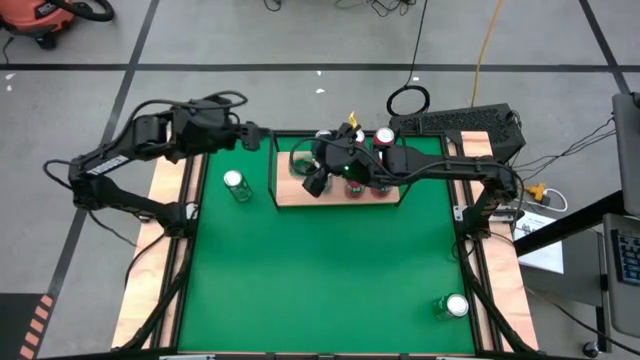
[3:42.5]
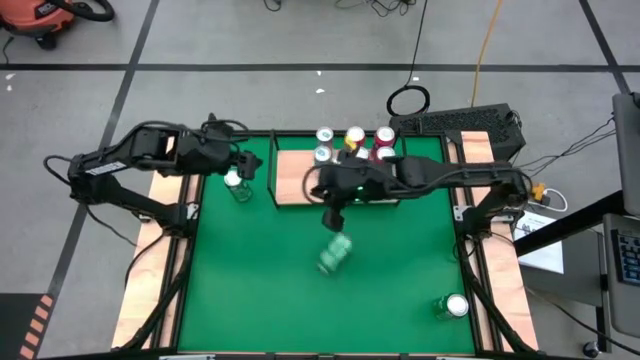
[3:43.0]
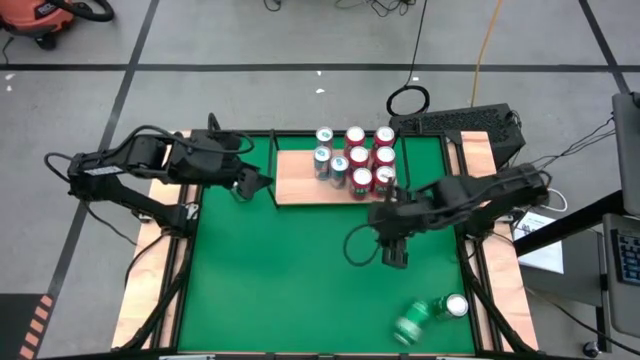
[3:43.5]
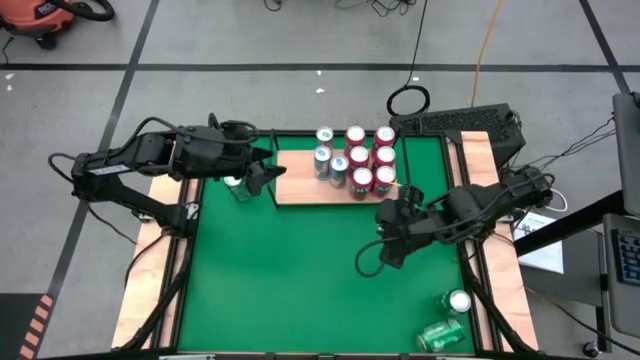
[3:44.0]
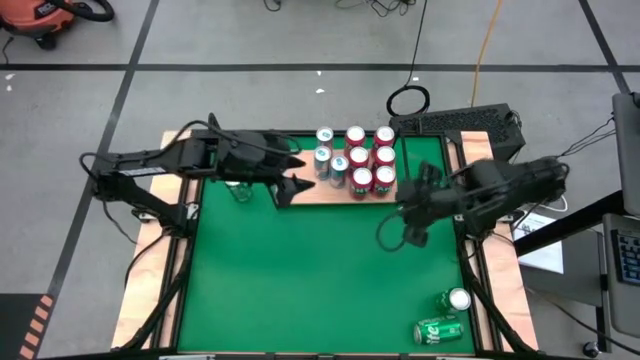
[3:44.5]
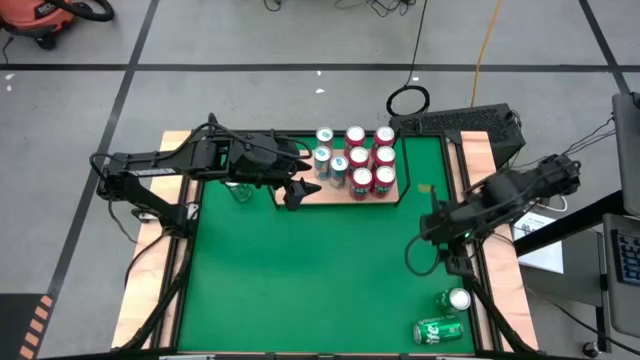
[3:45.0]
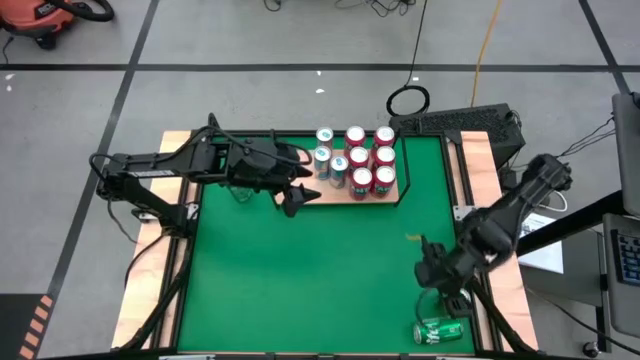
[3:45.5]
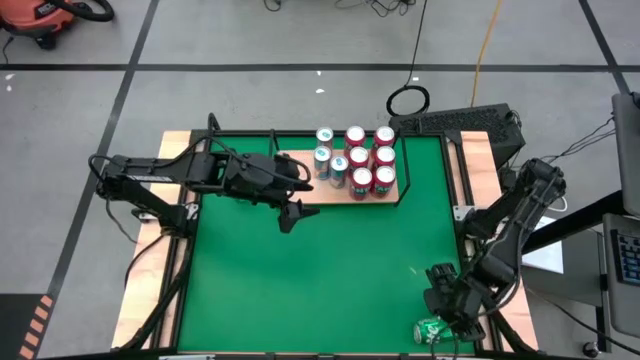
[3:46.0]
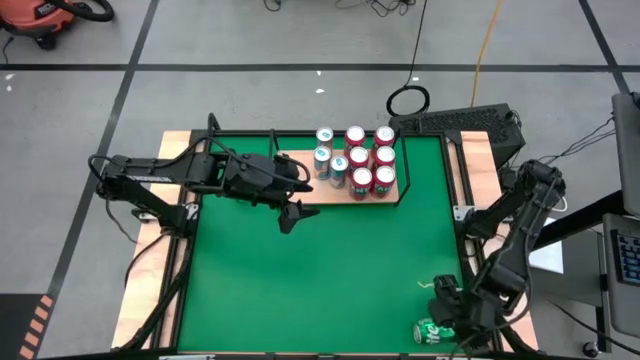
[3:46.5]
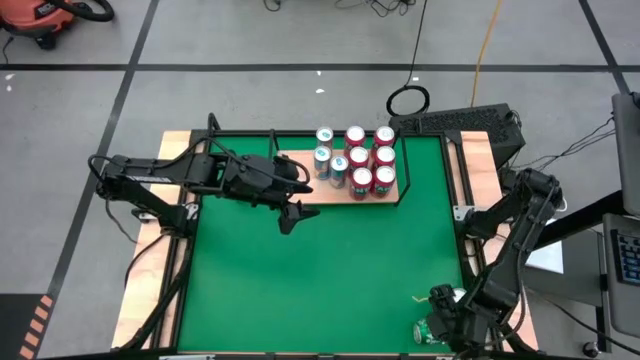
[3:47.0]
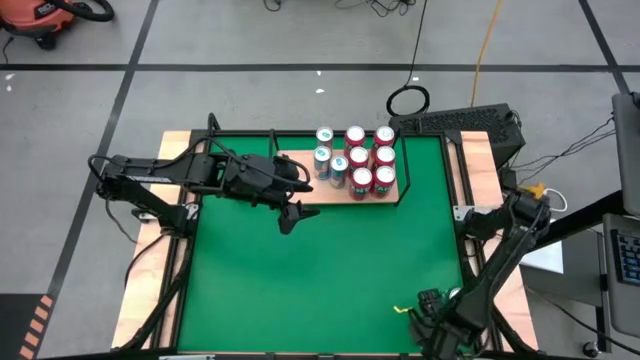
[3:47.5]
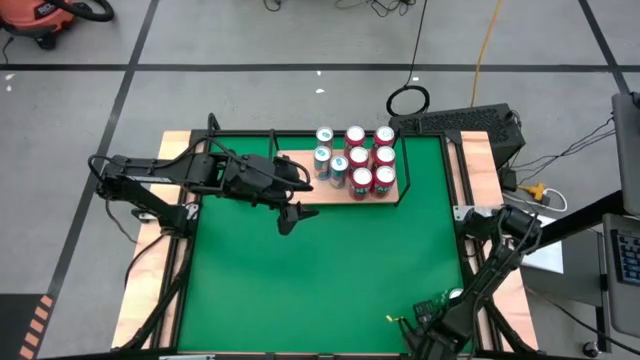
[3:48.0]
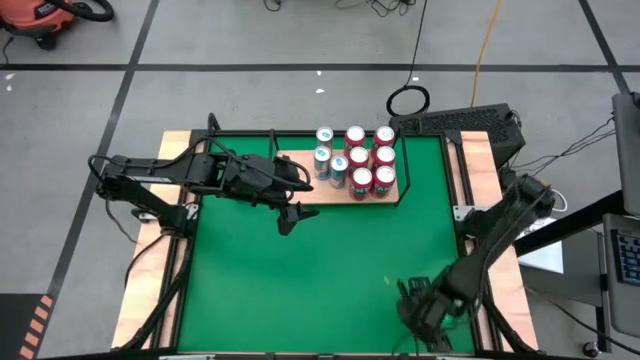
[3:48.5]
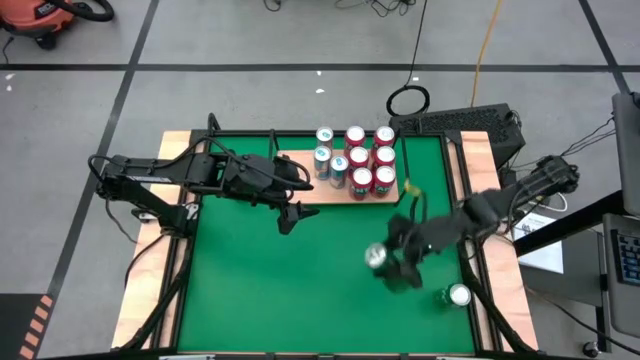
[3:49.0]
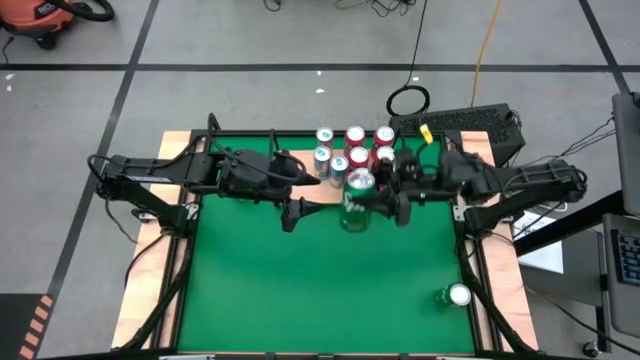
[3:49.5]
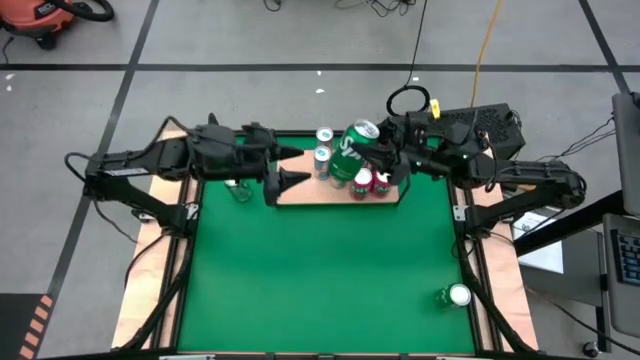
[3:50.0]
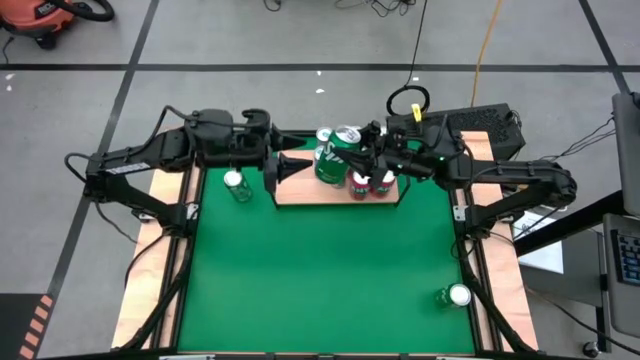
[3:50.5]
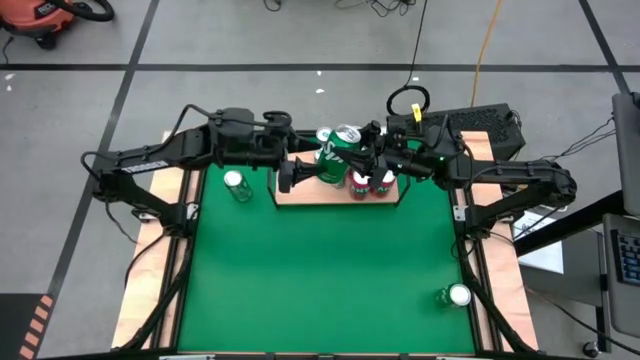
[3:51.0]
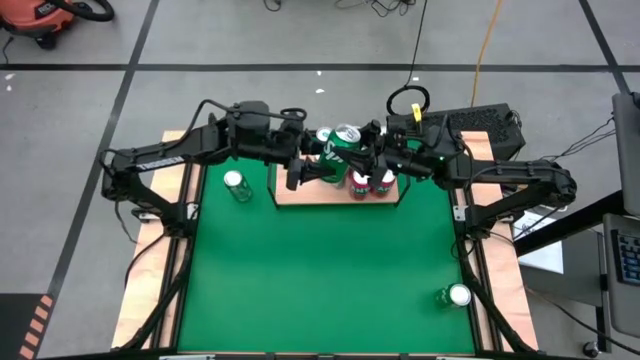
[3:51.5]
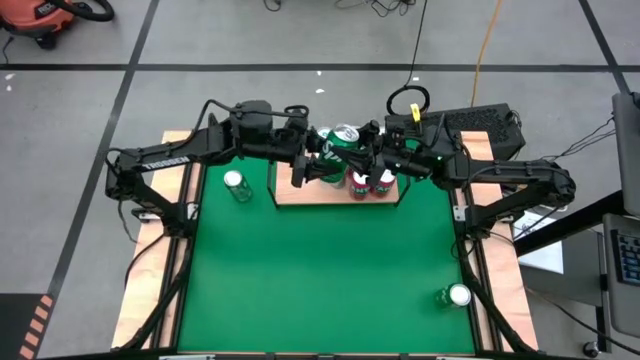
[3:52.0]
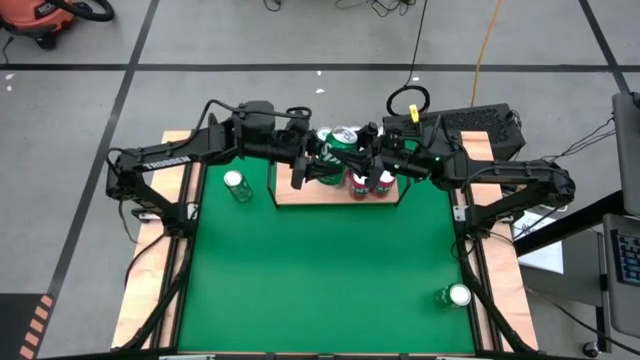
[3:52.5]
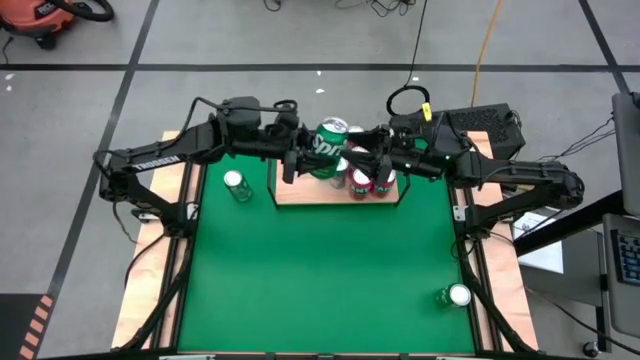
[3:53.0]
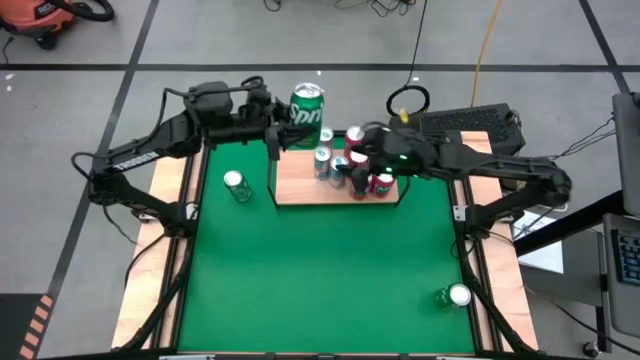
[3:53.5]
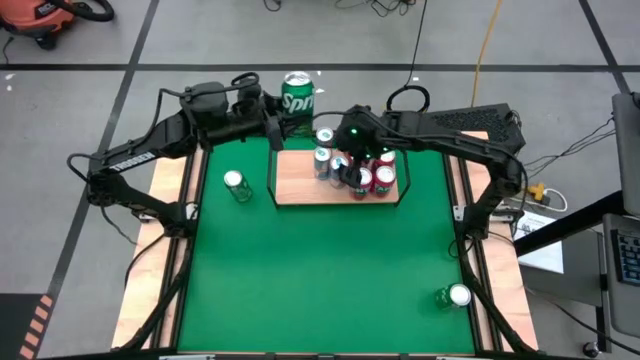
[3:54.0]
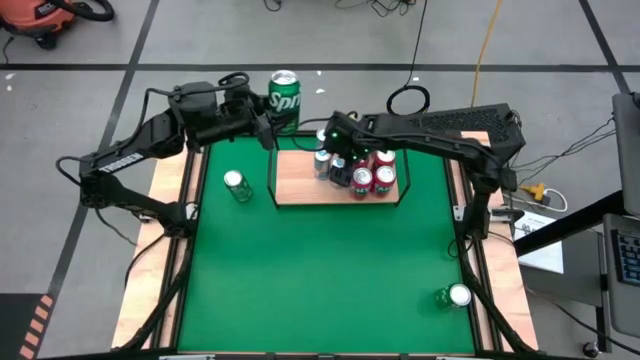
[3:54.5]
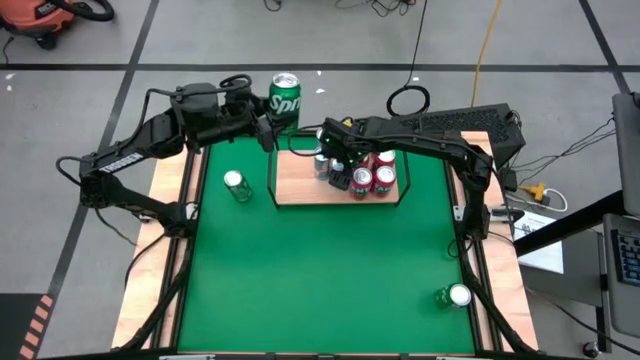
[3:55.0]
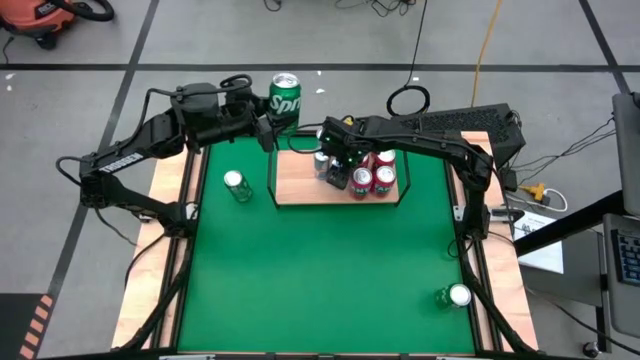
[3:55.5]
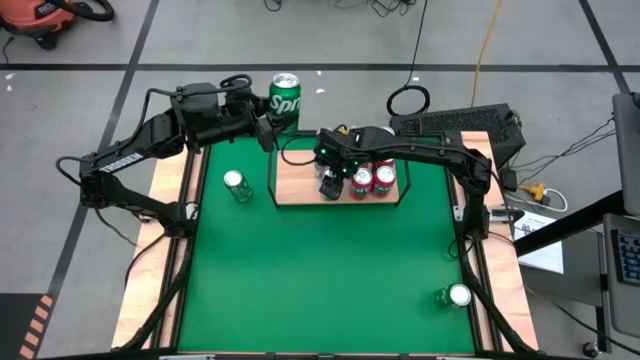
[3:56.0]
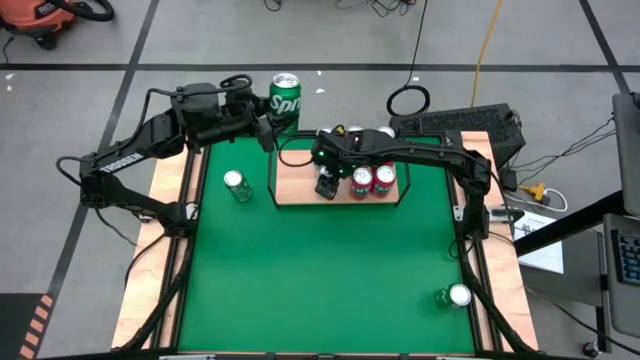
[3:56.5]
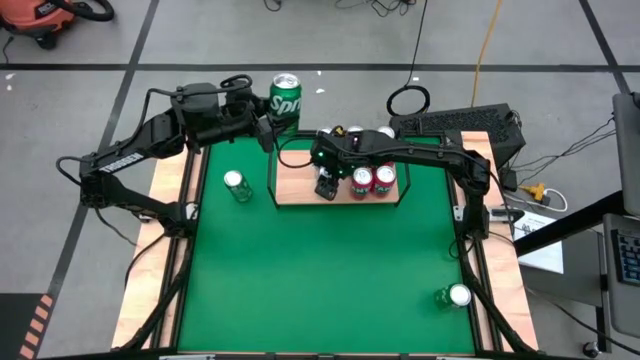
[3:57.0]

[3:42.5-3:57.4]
Task: Place canned beverage on shelf
Put the green soda can on the shelf

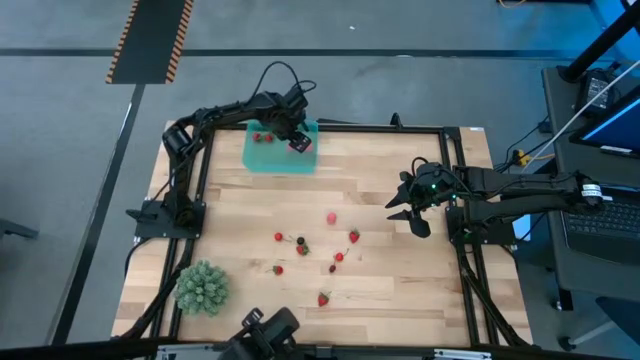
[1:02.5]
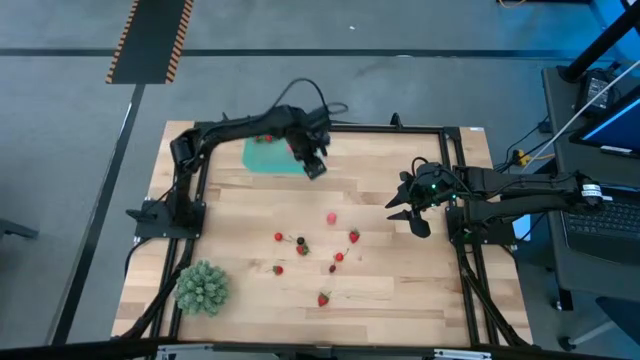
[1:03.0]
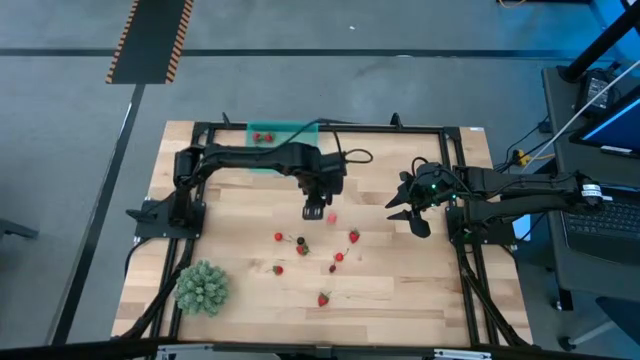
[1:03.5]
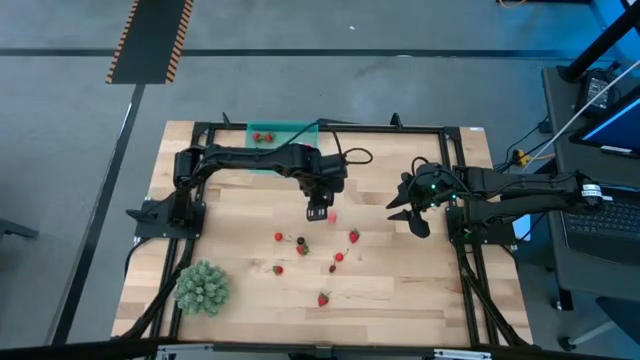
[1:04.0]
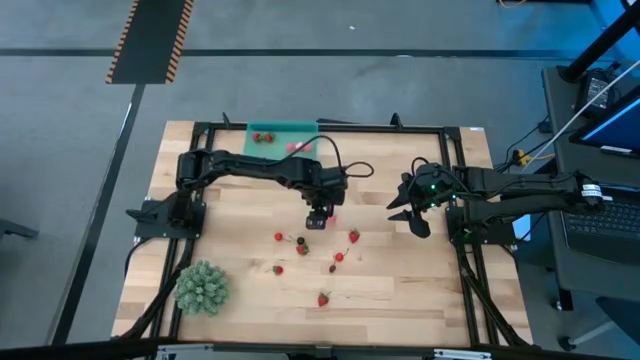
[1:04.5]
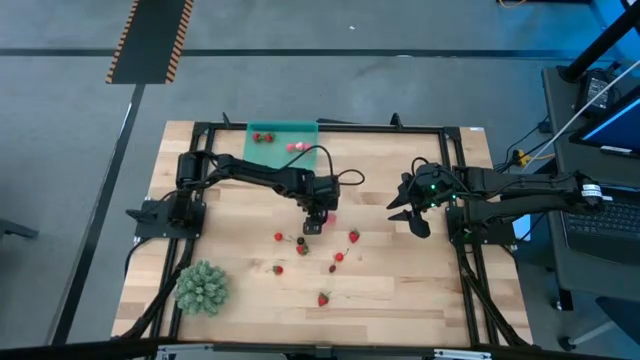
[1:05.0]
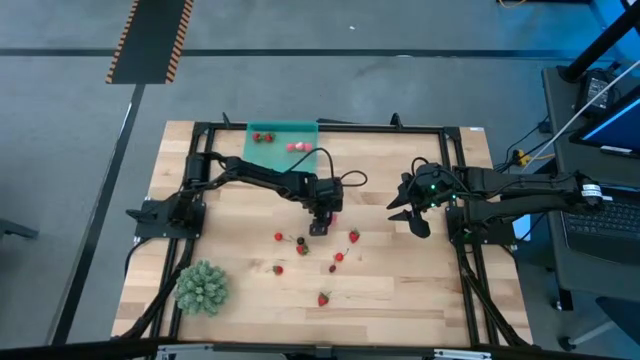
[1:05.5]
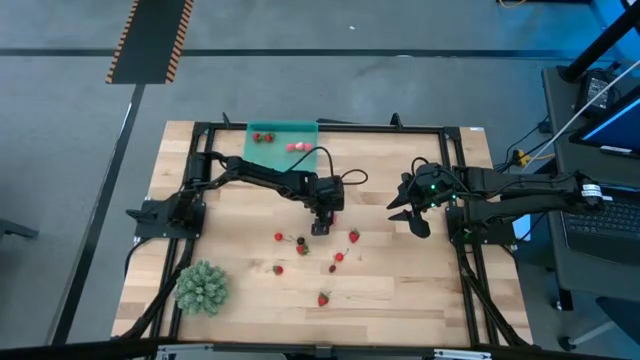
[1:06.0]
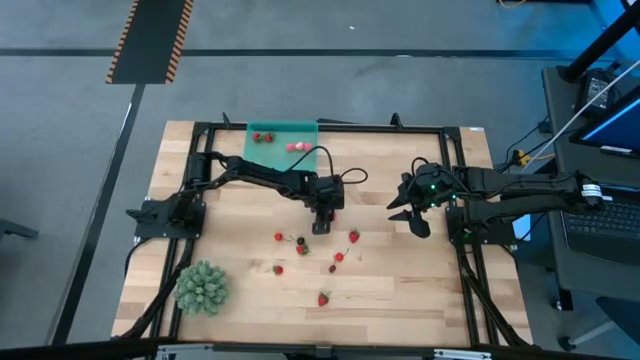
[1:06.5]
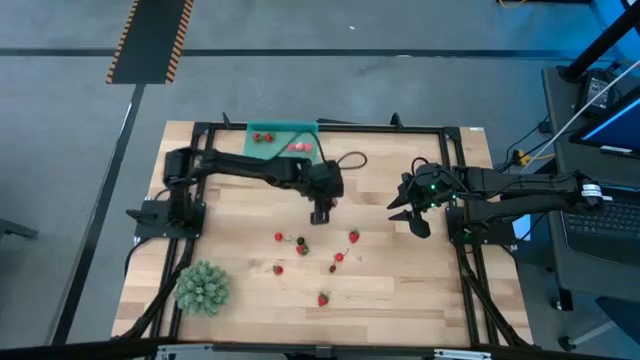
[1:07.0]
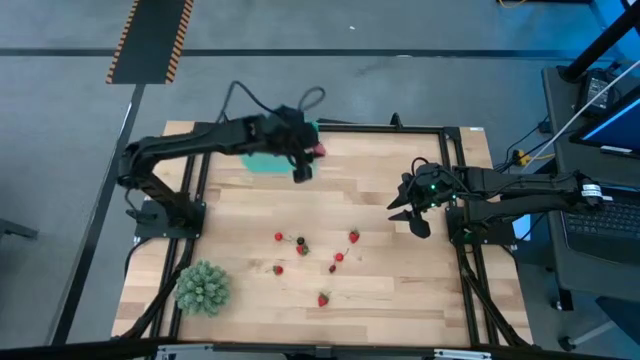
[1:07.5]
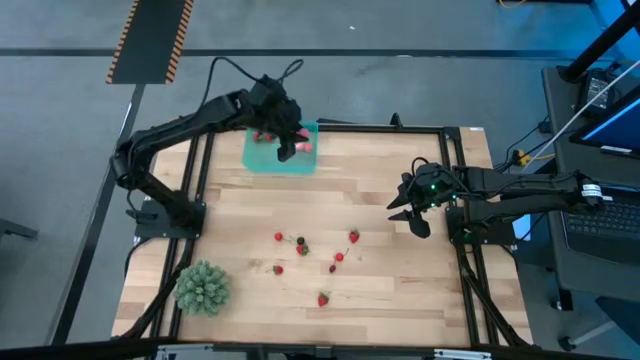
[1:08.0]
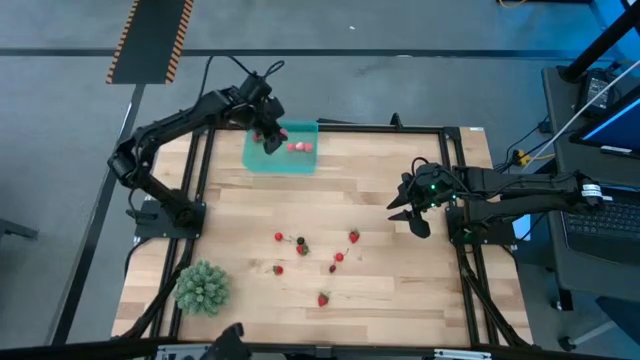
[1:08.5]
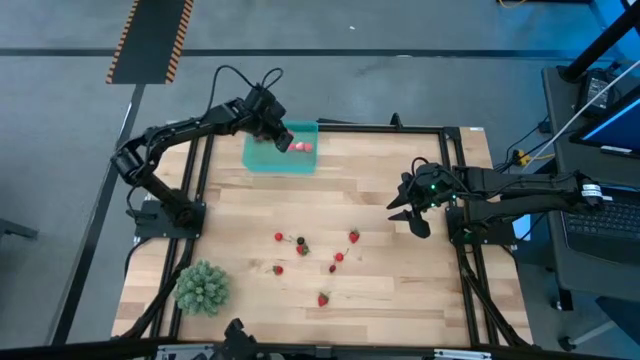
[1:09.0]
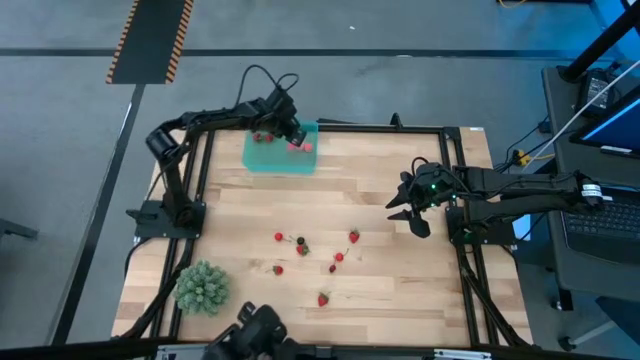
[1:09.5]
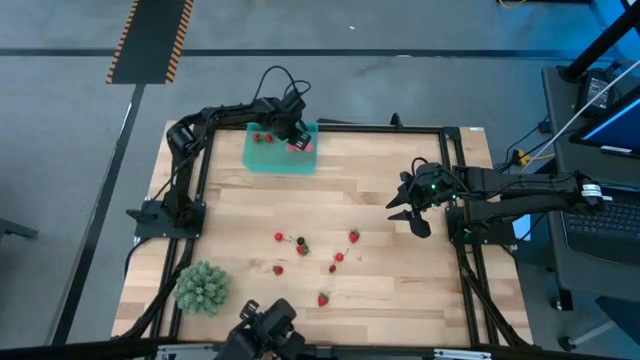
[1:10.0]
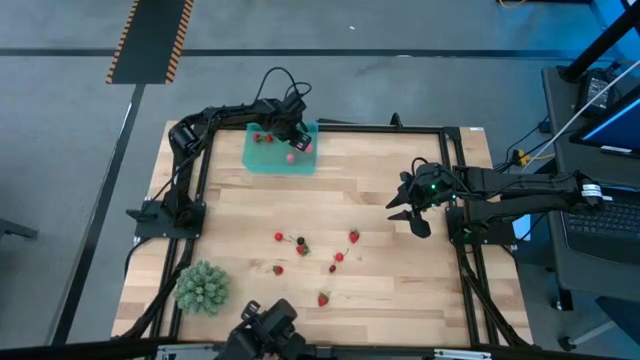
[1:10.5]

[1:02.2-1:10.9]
Task: Pick and placing Produce into tupperware
Put the pink peach into the blue bin
